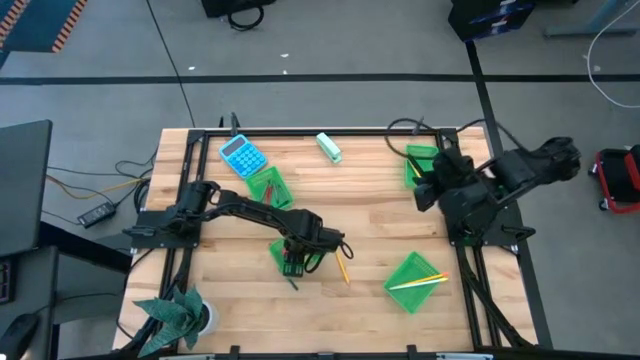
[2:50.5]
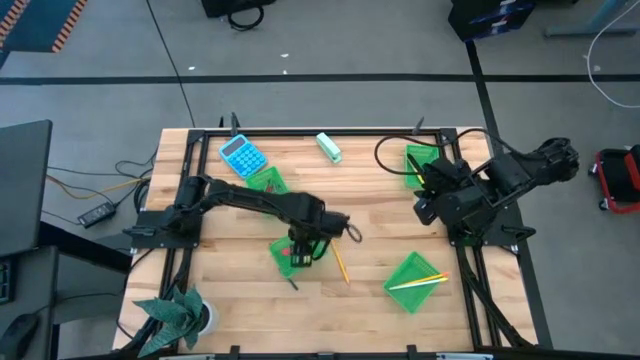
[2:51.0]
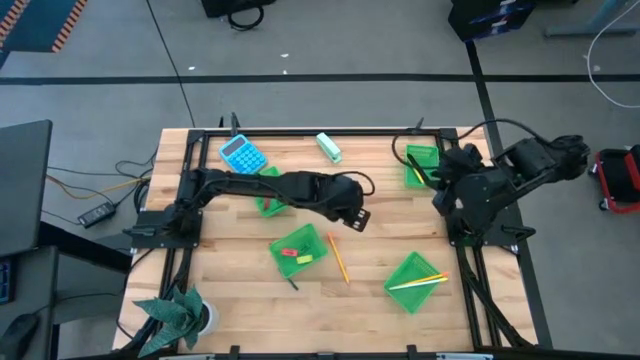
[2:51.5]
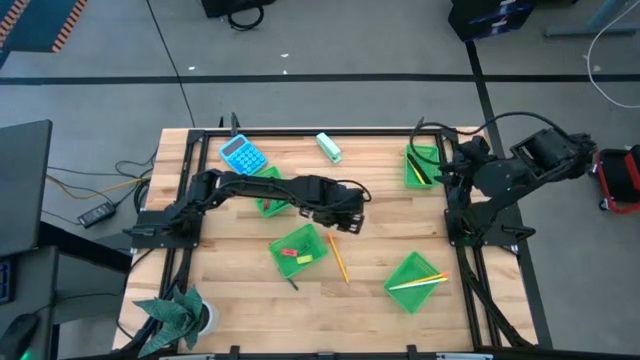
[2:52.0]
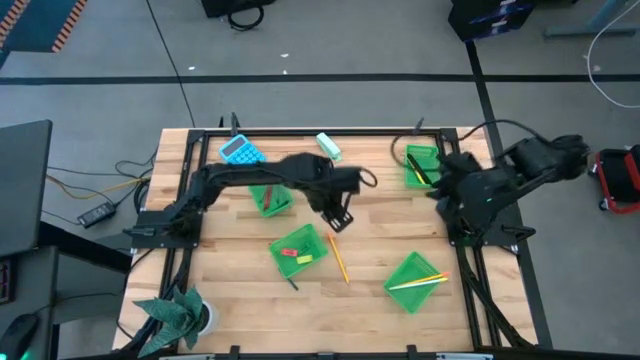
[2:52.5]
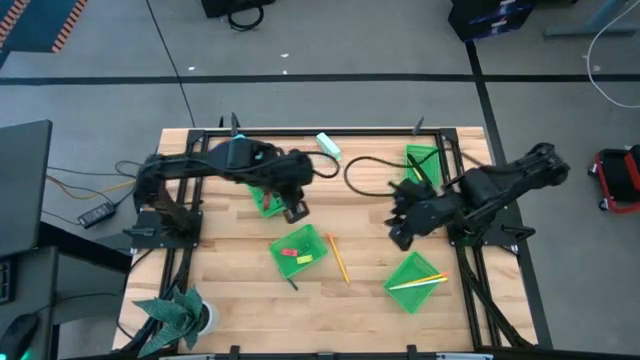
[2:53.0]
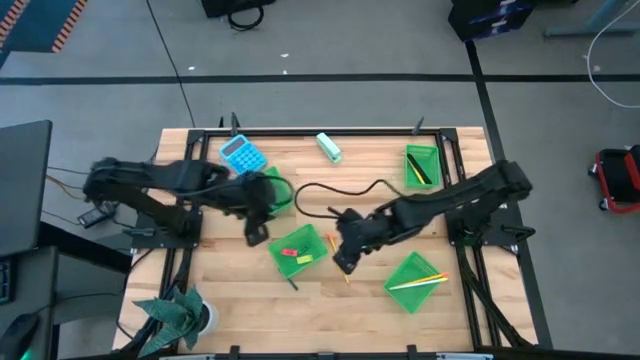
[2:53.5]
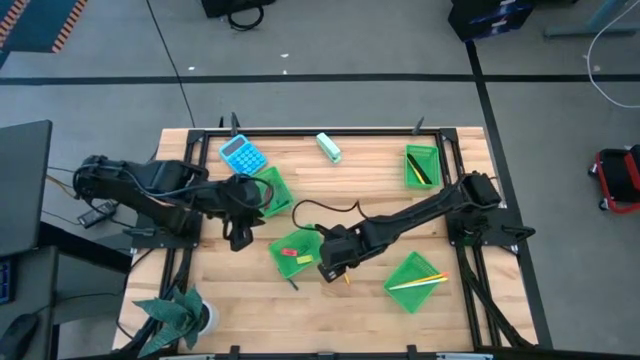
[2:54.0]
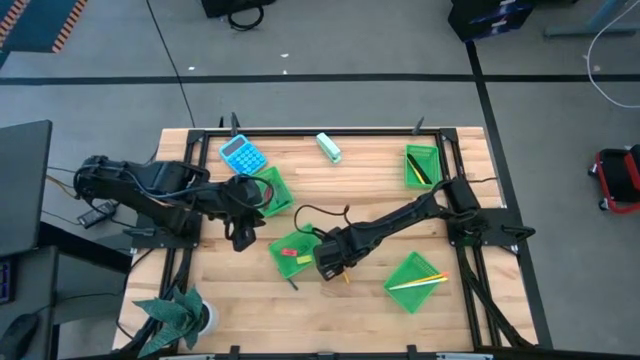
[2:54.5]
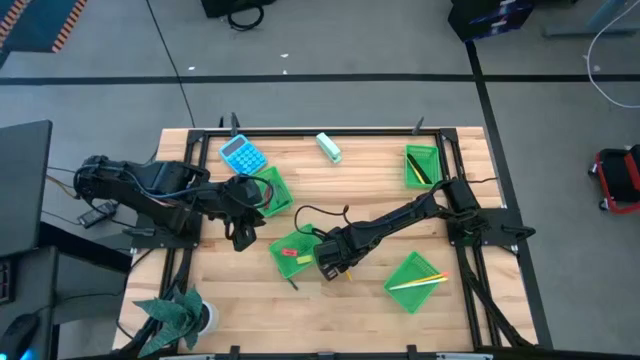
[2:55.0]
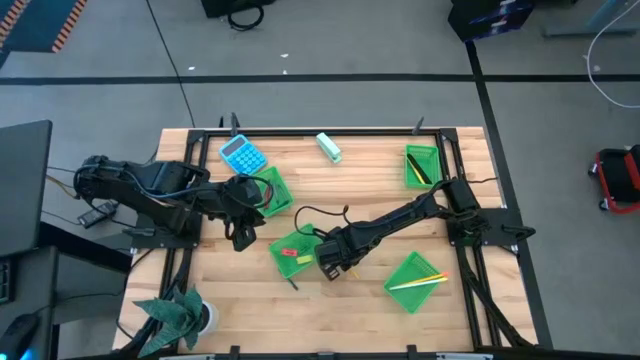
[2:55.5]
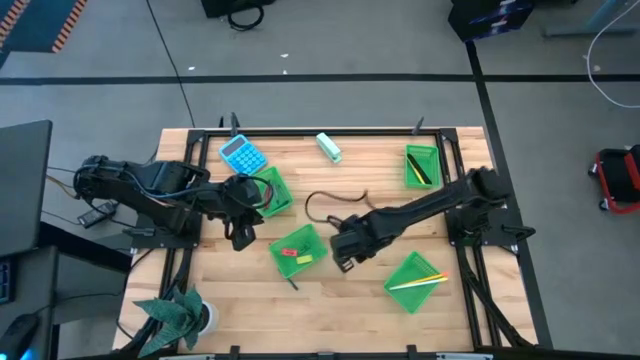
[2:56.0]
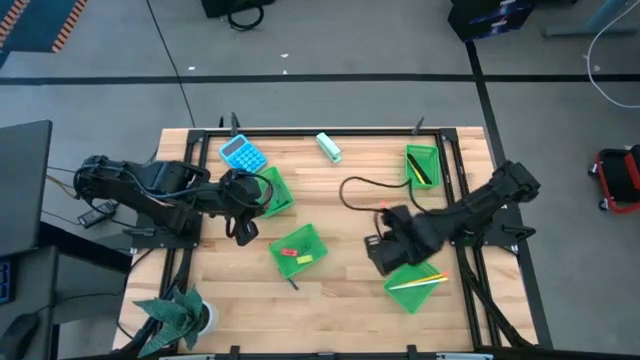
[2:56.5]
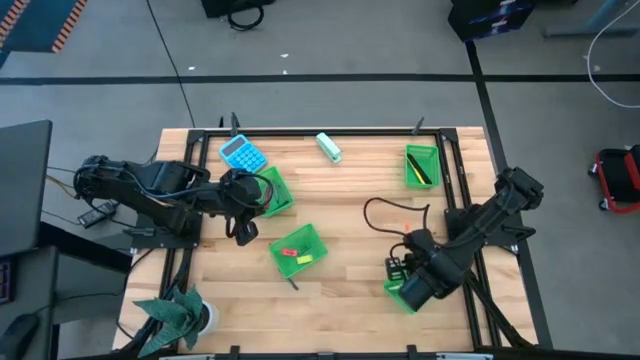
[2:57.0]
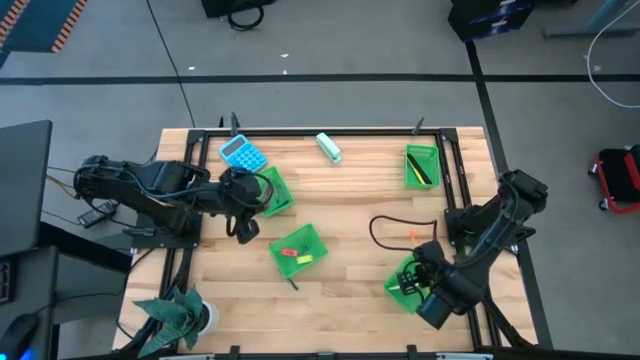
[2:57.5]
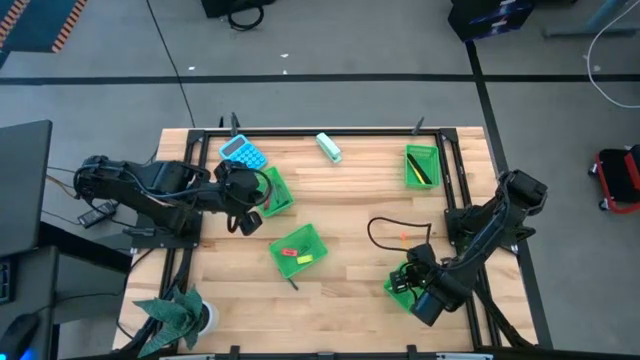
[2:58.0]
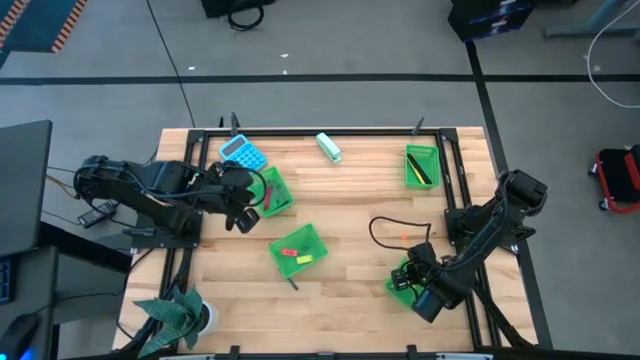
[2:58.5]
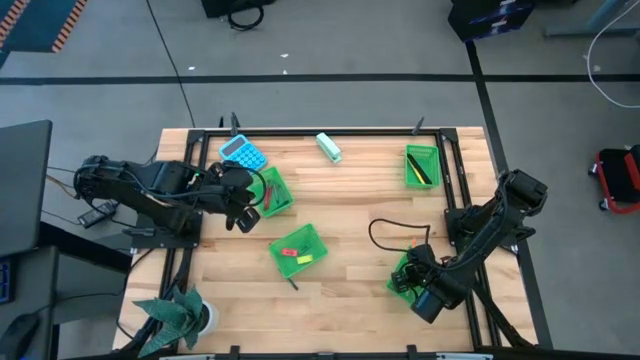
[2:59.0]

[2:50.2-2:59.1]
Task: Sort crayons/erasers/pens/pencils in bins
Put the yellow pencil into the bottom right green bin

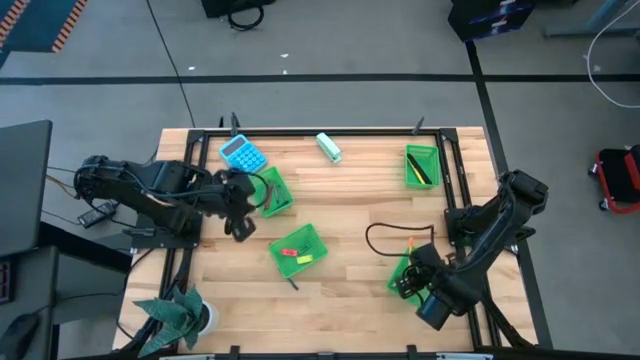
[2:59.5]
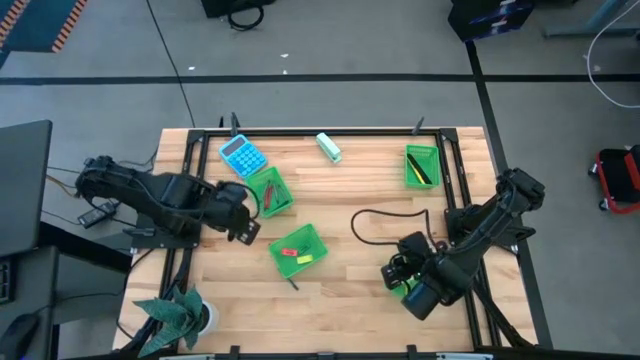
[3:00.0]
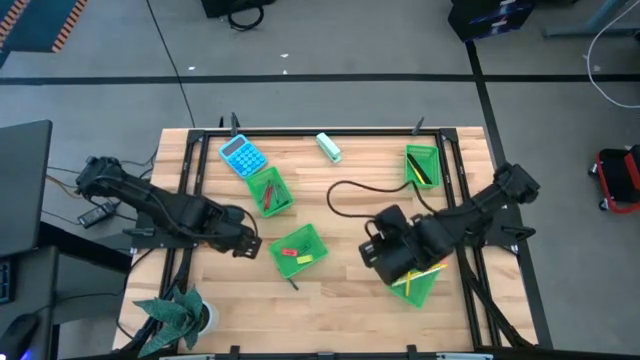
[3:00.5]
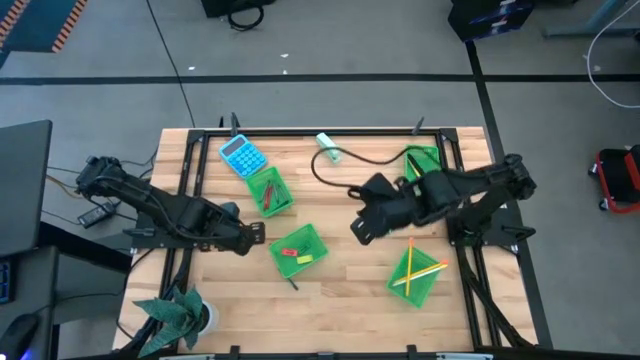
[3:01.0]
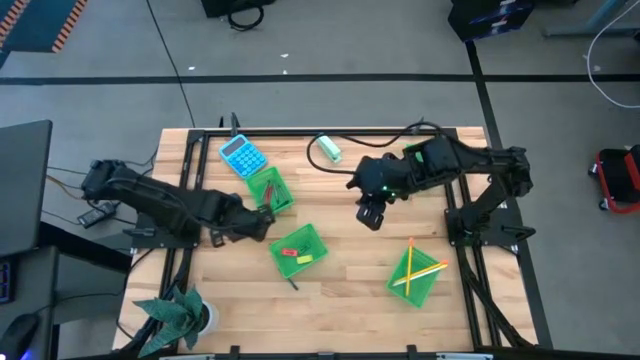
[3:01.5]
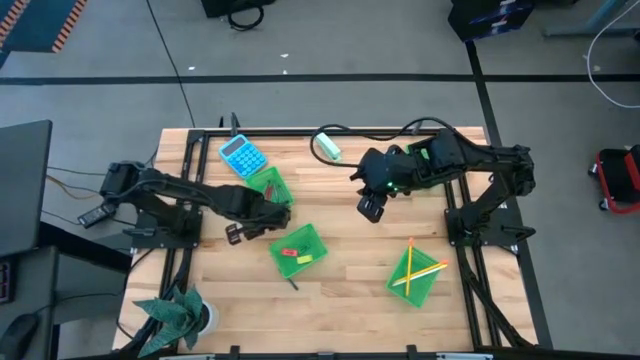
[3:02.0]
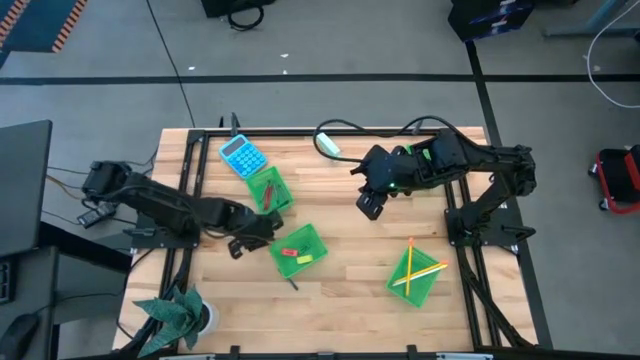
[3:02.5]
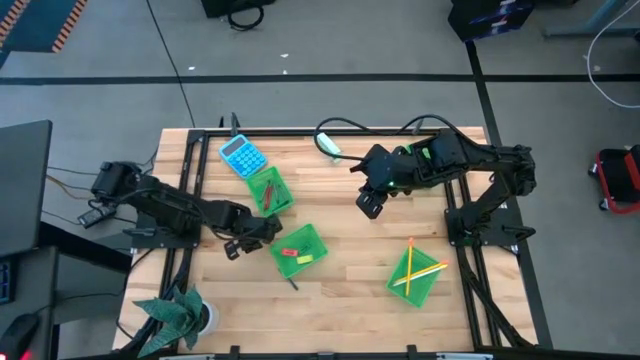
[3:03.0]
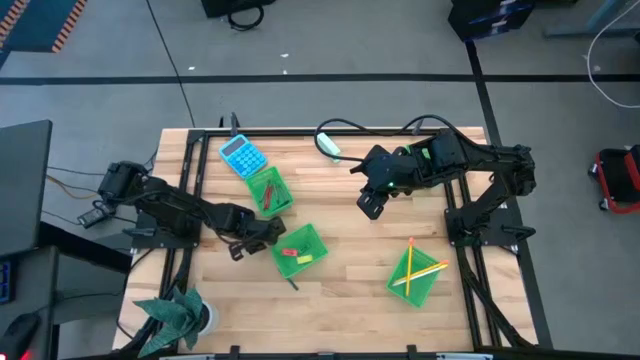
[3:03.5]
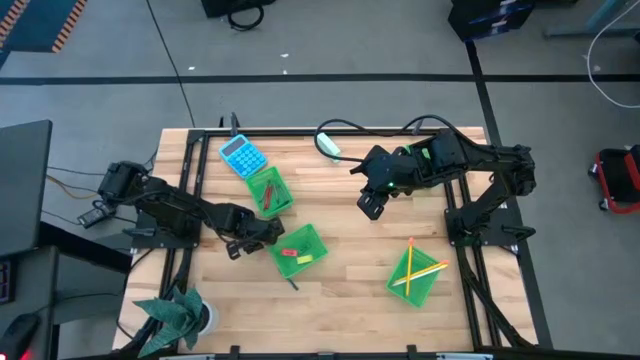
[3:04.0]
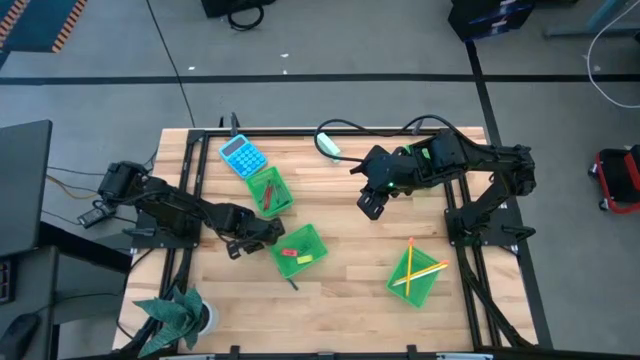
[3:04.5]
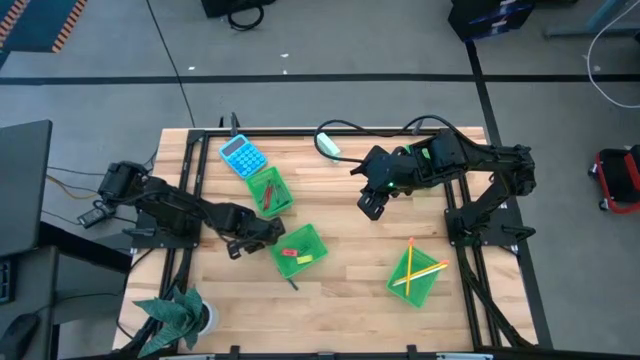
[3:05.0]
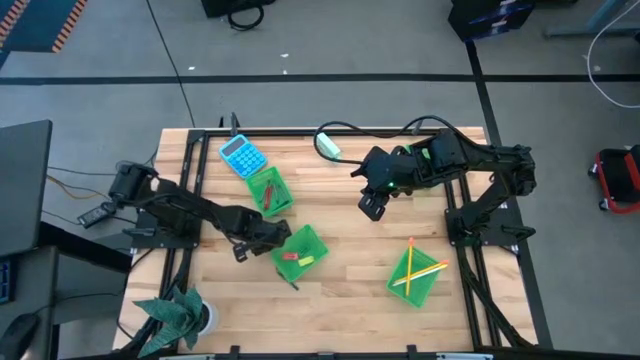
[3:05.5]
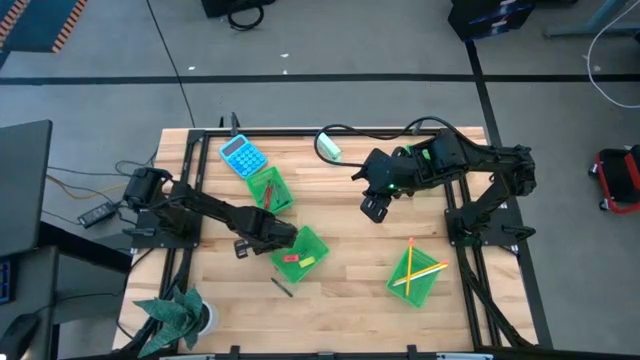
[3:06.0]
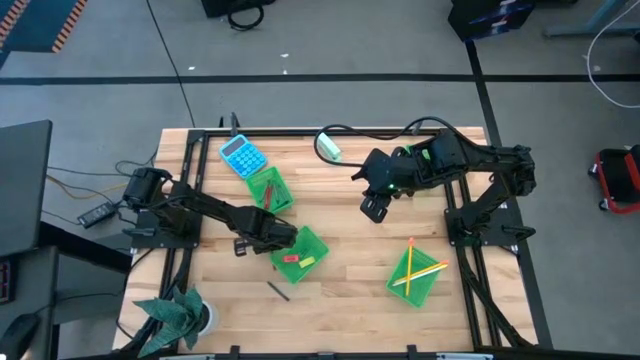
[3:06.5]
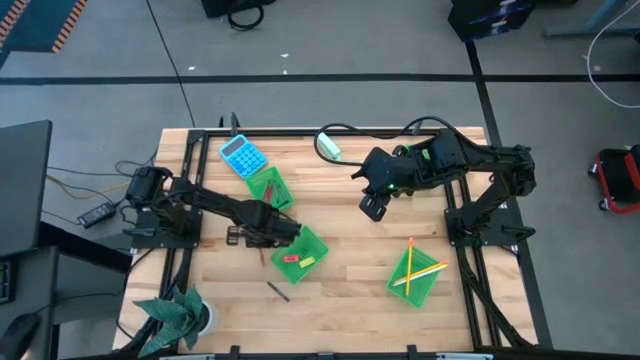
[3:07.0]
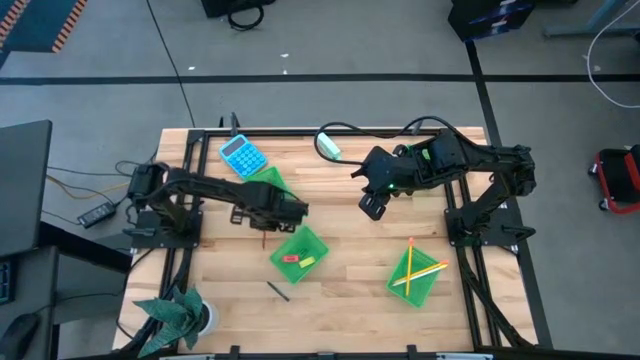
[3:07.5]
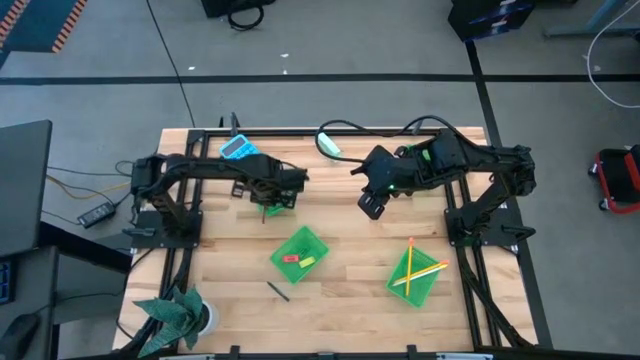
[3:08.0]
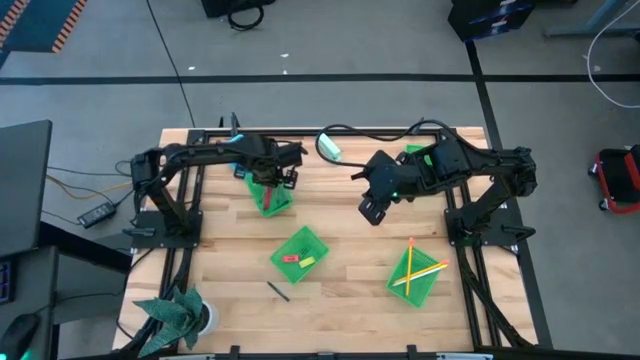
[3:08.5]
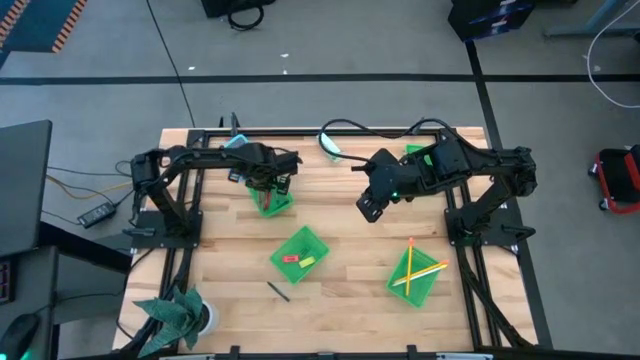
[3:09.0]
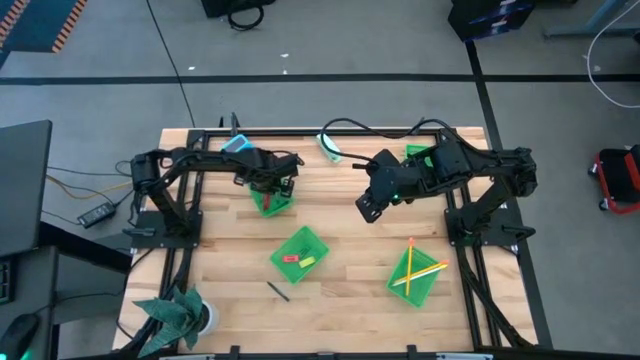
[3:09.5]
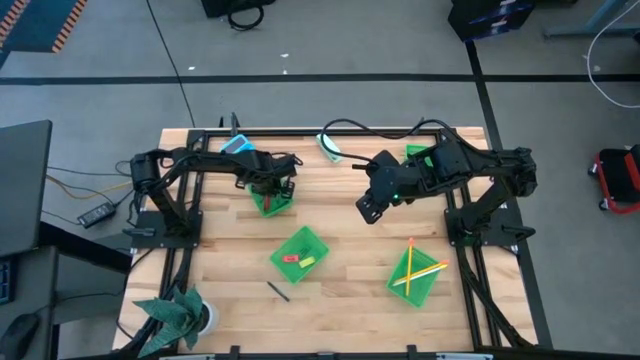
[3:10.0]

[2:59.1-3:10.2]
Put the red crayon into the top left green bin

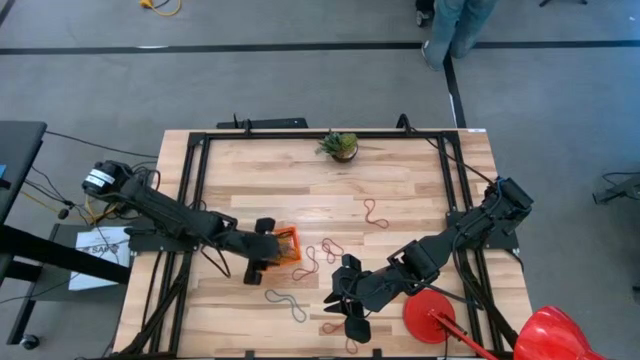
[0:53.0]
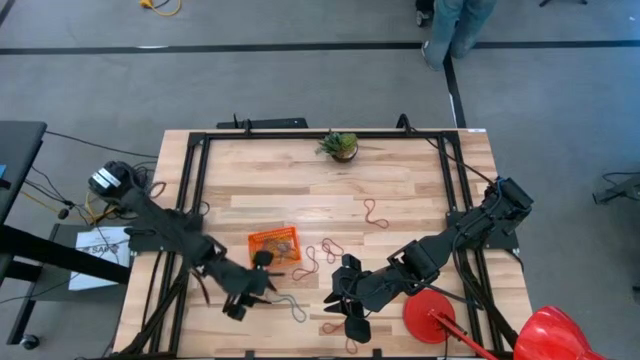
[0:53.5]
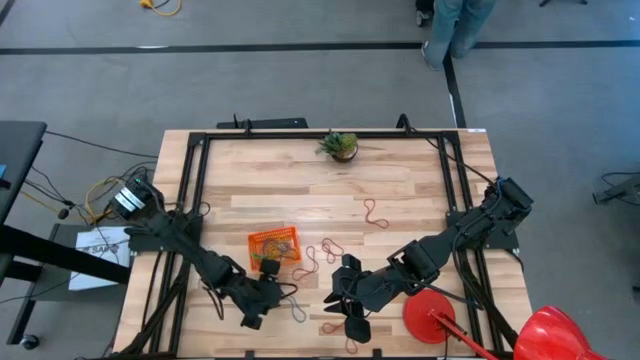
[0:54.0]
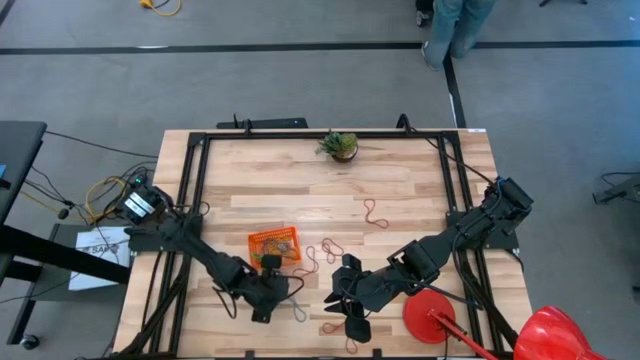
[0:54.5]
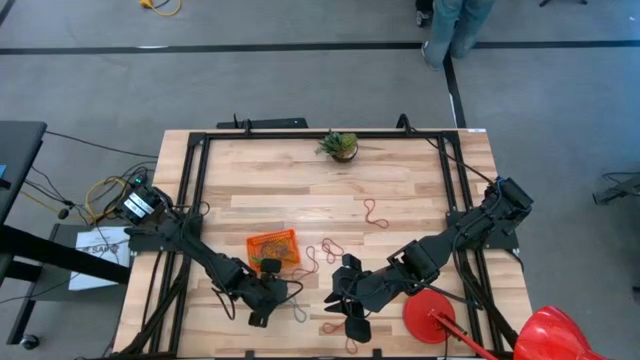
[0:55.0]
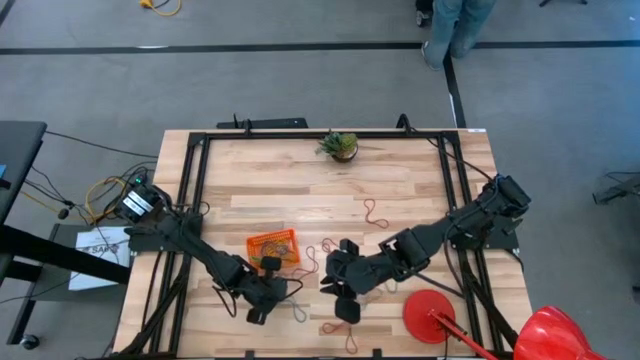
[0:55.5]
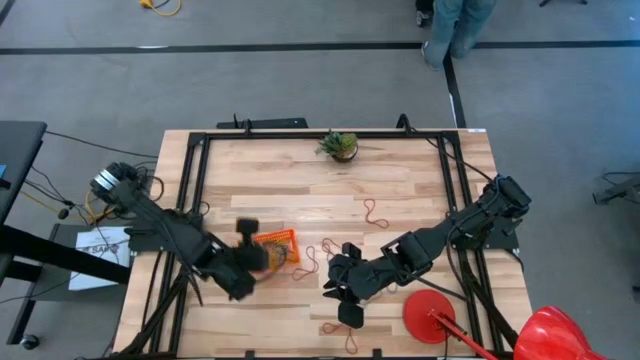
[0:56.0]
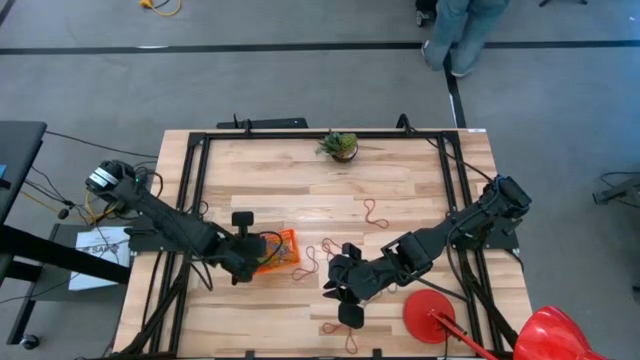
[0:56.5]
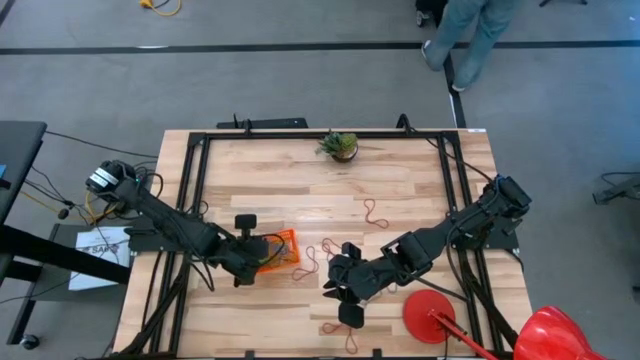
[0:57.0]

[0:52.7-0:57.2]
Task: Pick and place rubber bands into bin
Put the left blue rubber band into the orange container
